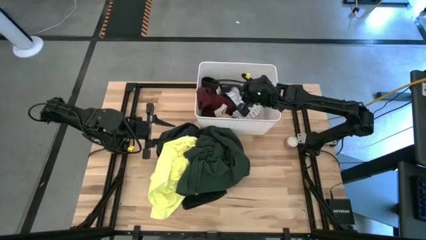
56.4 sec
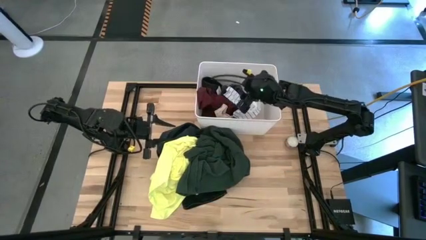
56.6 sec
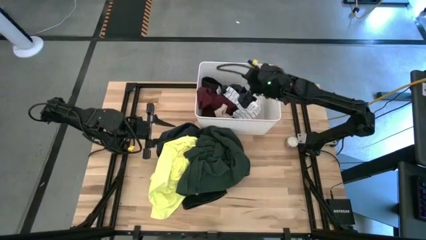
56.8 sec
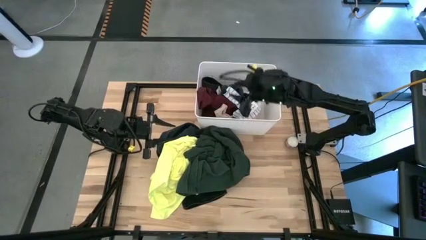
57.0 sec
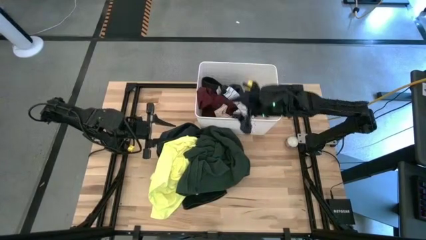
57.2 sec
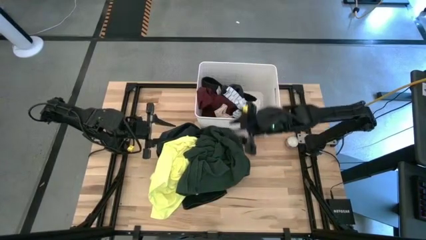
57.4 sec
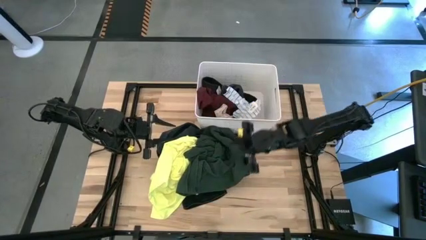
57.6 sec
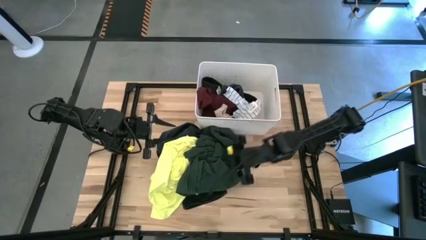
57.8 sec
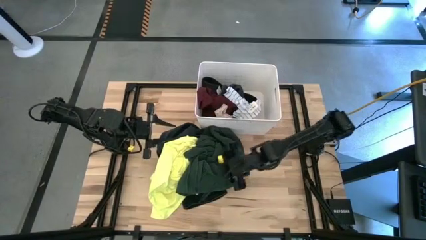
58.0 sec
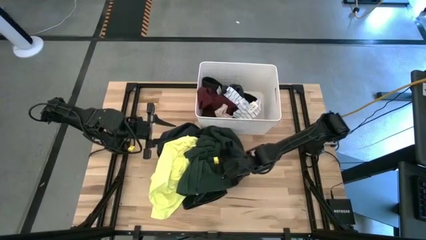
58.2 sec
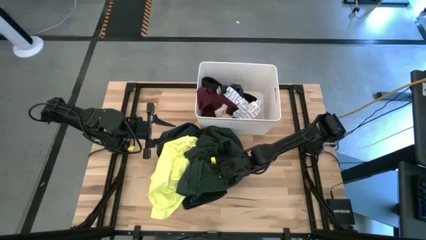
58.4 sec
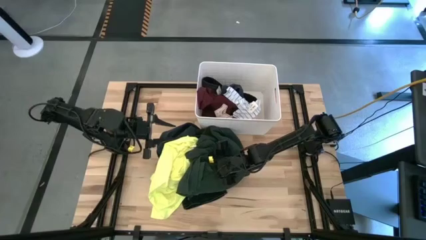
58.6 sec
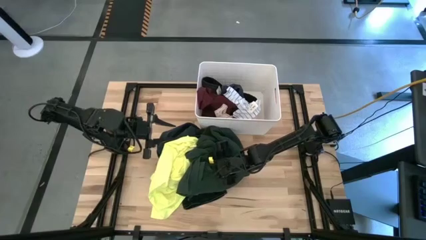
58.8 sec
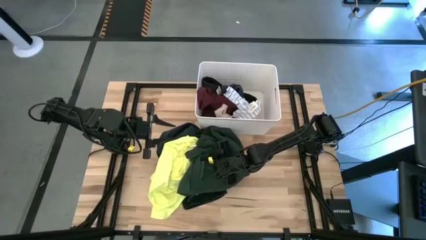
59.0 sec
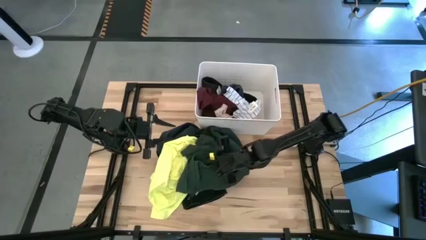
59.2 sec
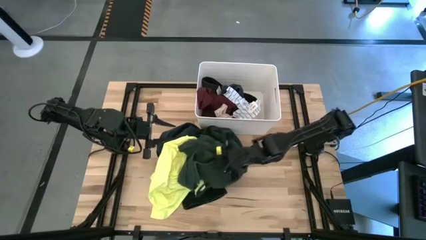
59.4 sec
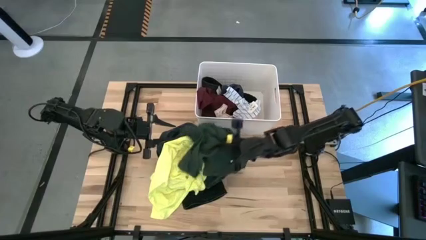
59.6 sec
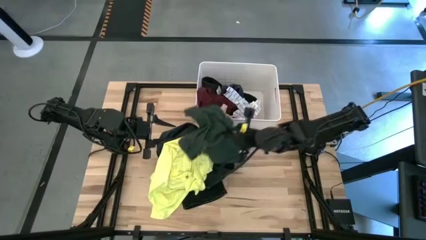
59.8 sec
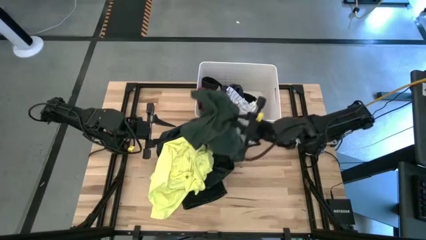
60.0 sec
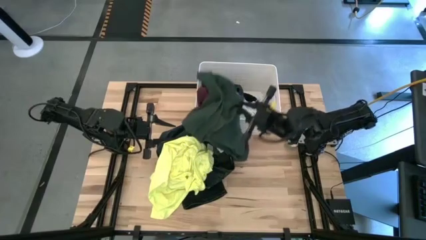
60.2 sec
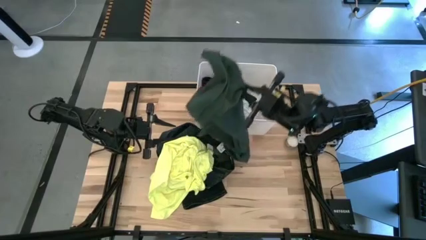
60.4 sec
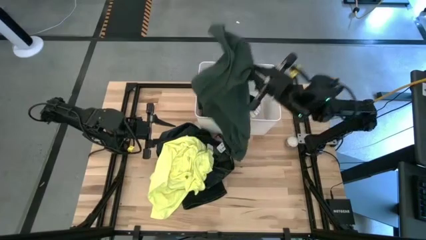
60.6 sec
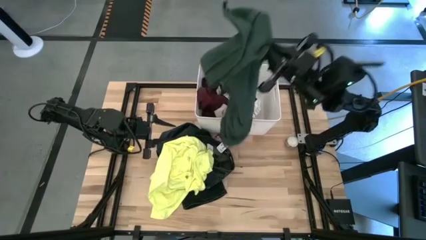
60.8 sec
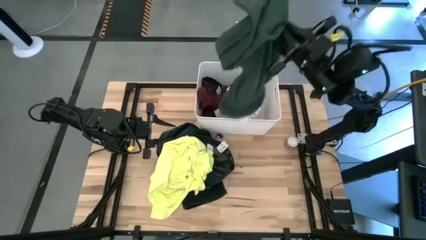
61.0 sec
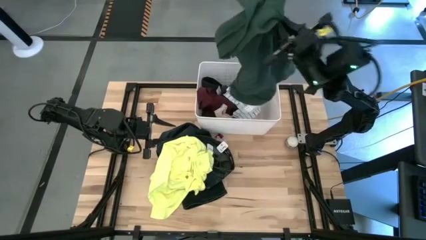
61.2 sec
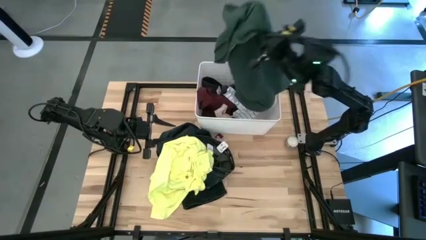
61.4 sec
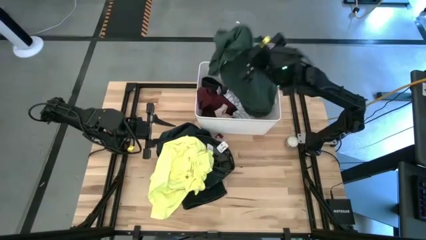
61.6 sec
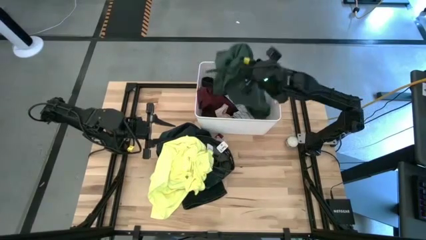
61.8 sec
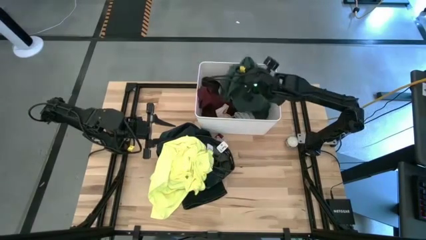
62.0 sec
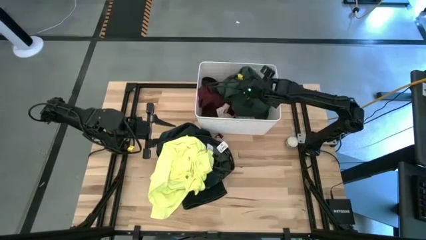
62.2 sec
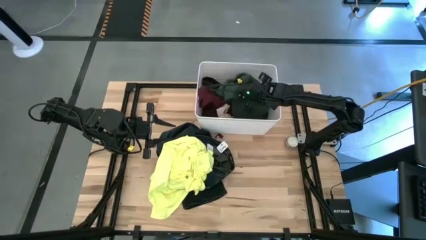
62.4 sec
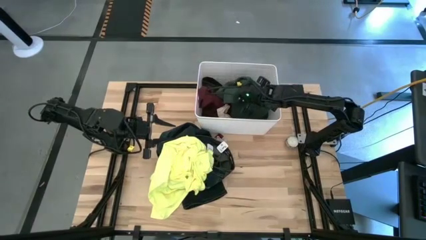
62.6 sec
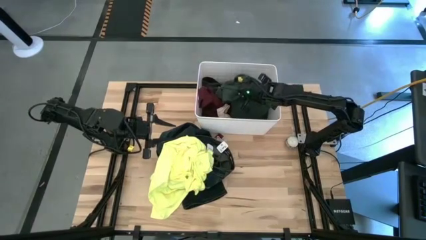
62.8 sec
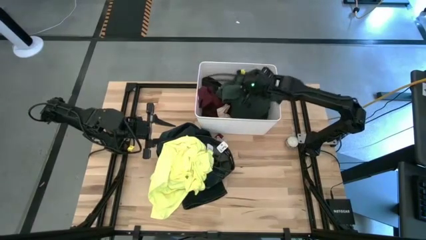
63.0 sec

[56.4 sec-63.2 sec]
Task: Sort clothes
Put the green shirt into the white laundry organizer

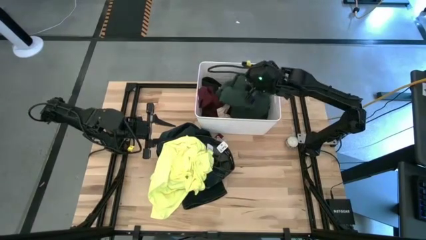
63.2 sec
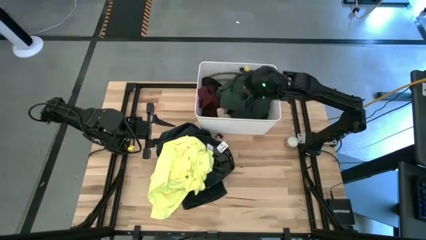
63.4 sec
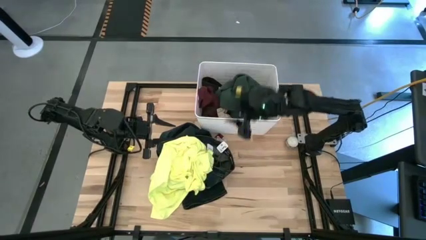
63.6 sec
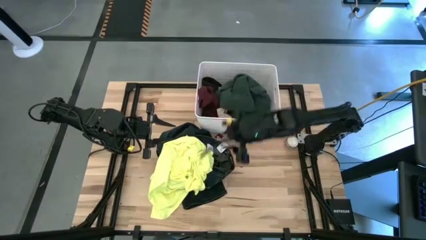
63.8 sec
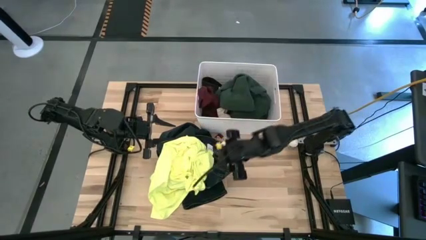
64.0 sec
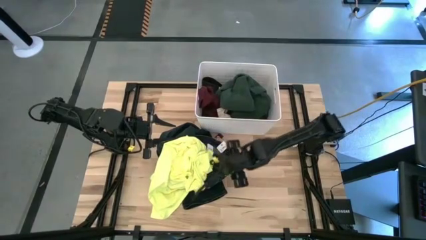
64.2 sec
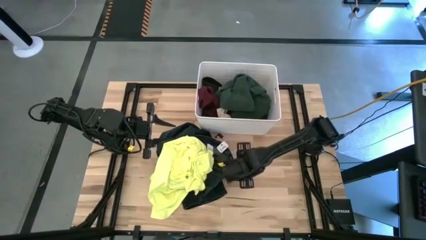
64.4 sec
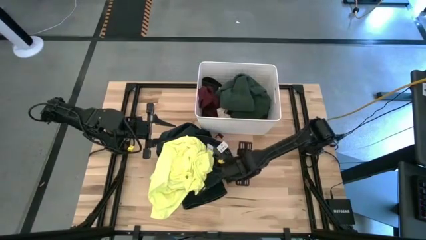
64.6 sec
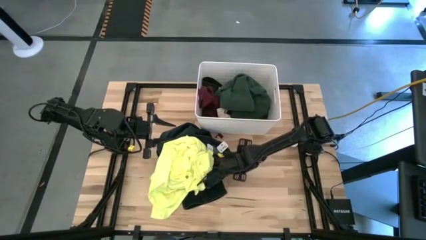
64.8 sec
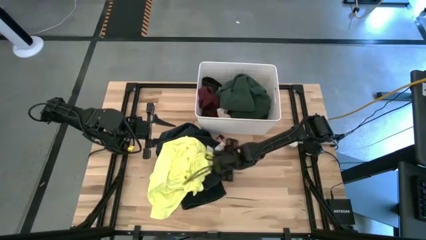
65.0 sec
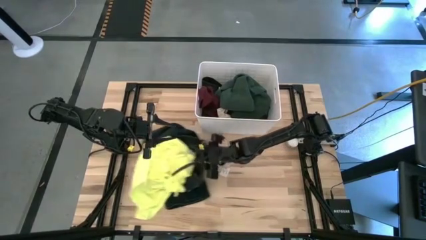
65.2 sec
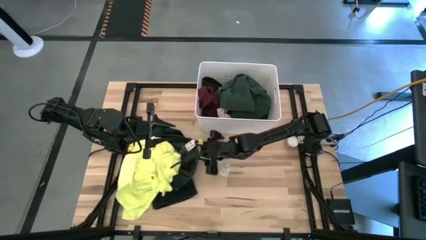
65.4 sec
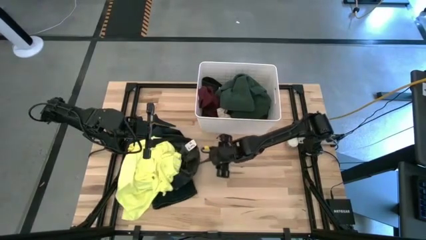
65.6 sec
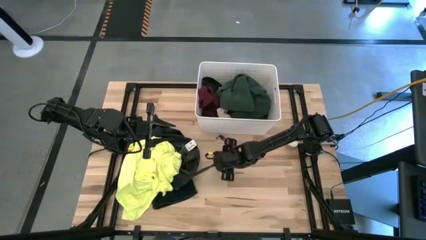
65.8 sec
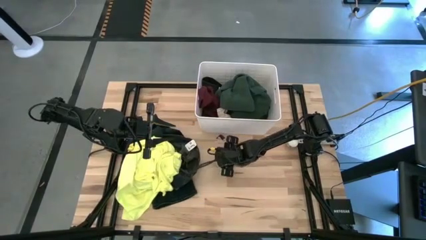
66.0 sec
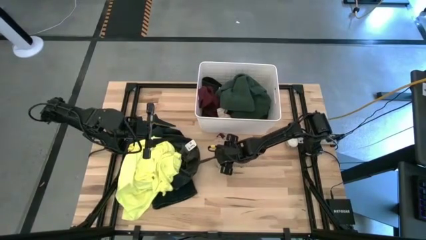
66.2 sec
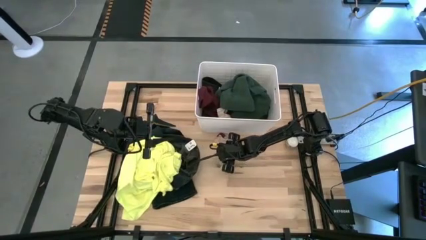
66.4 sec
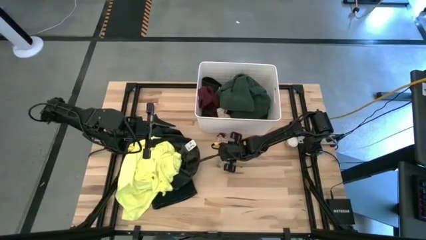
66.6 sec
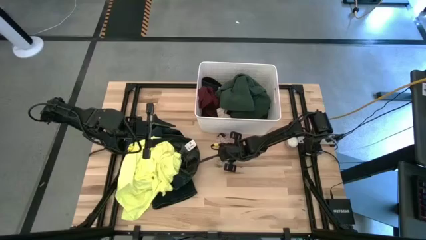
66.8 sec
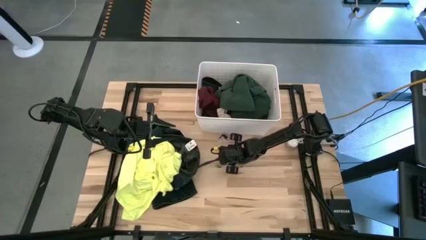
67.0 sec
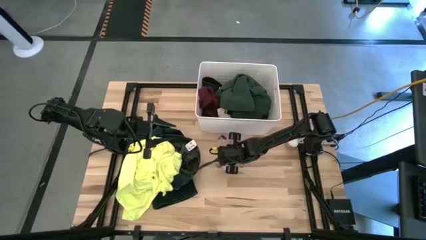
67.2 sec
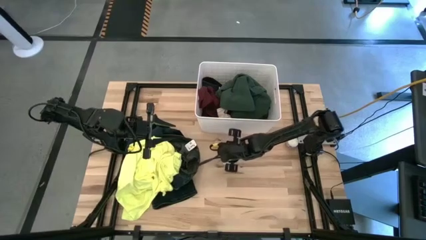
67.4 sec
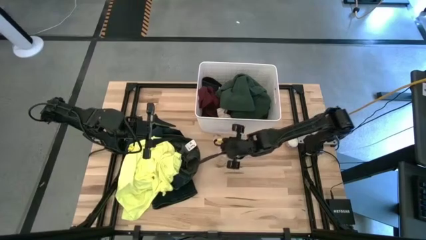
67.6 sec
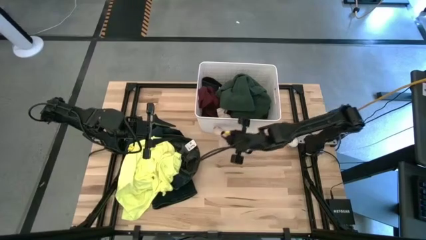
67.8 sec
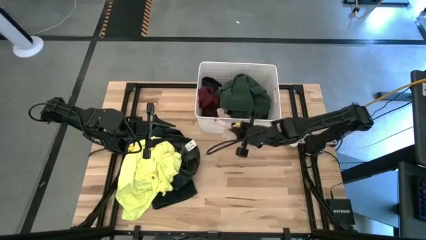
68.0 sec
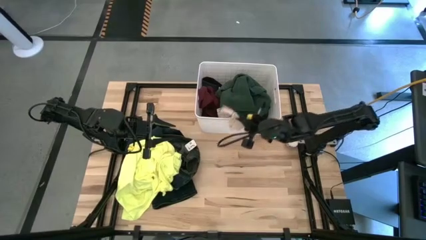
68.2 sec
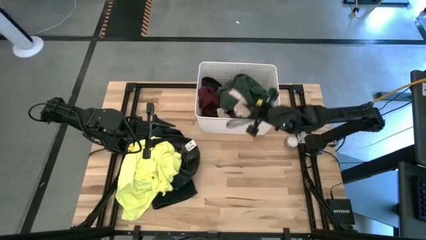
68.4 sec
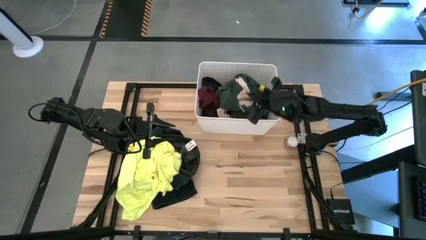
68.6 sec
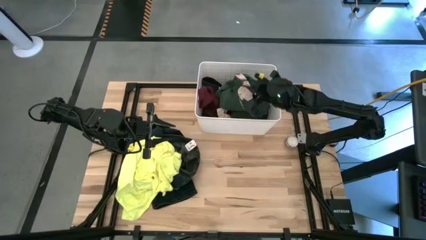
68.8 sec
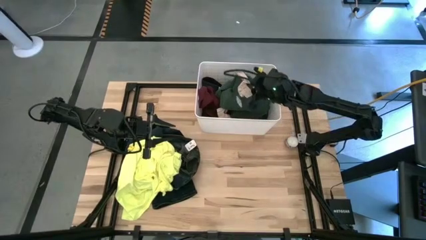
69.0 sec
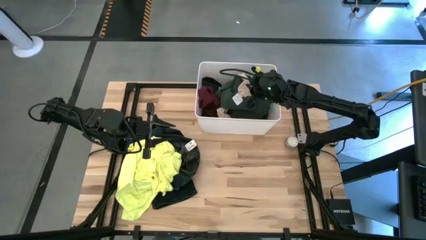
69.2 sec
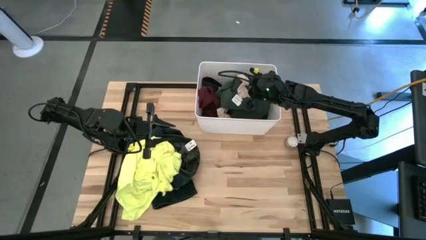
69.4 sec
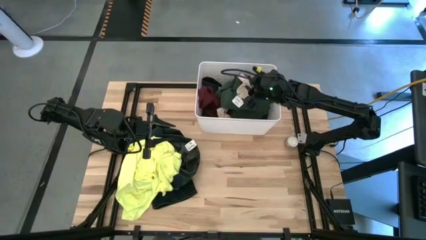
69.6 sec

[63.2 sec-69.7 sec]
Put the white/pink sock into the white laundry organizer

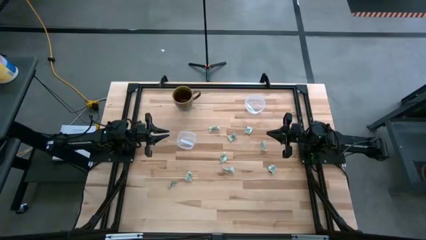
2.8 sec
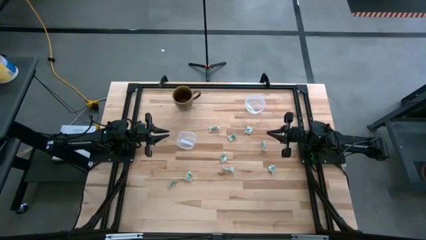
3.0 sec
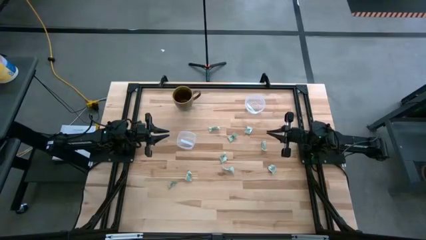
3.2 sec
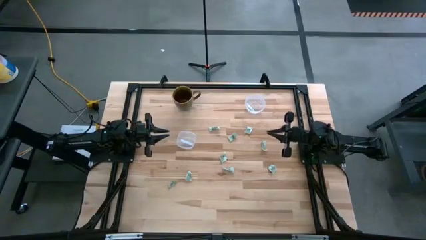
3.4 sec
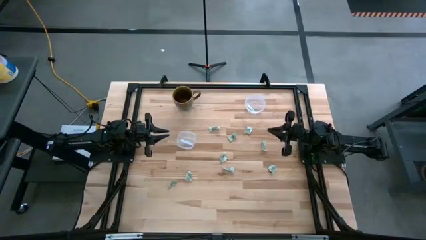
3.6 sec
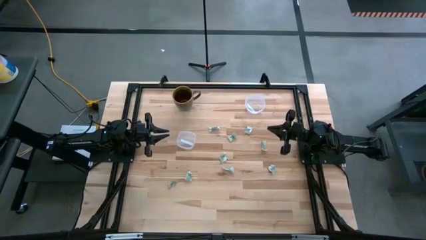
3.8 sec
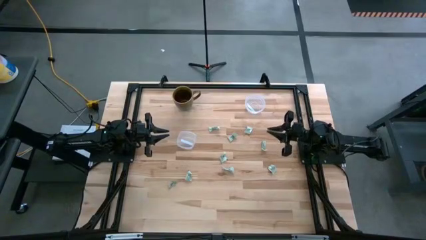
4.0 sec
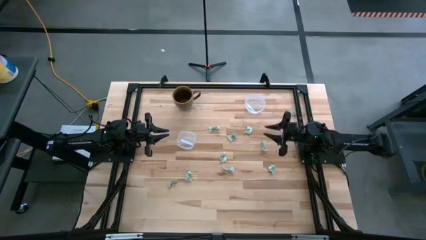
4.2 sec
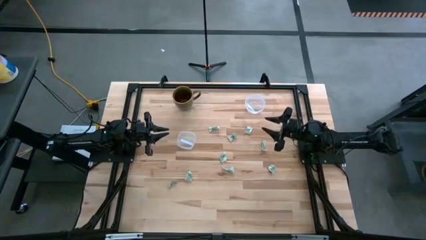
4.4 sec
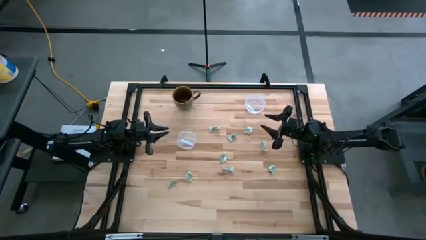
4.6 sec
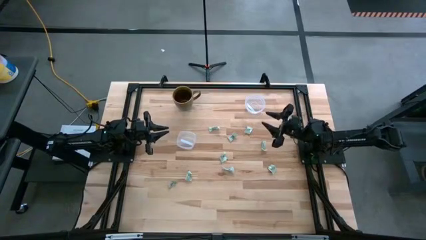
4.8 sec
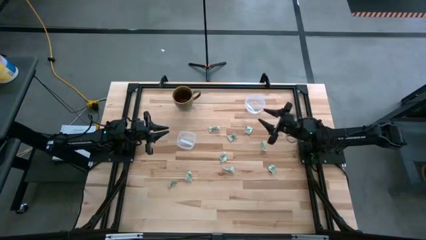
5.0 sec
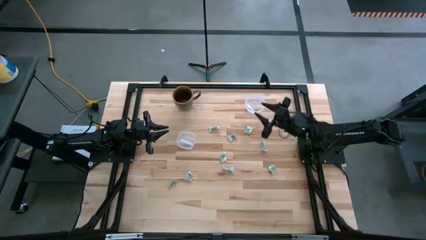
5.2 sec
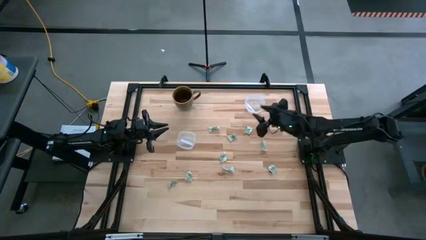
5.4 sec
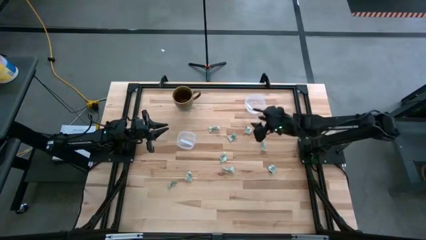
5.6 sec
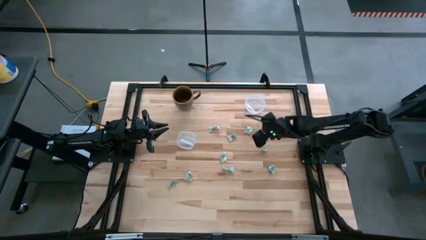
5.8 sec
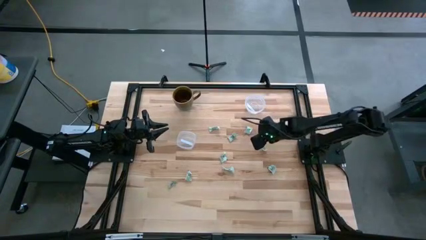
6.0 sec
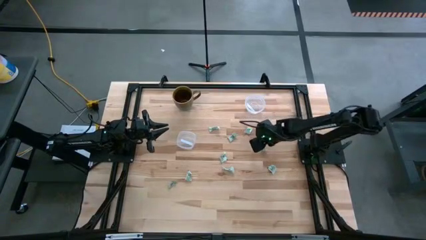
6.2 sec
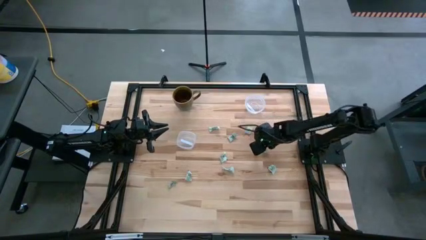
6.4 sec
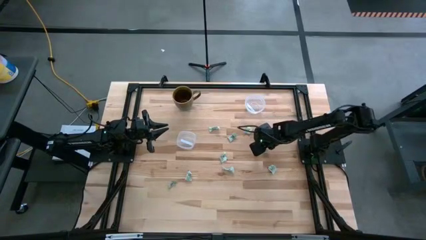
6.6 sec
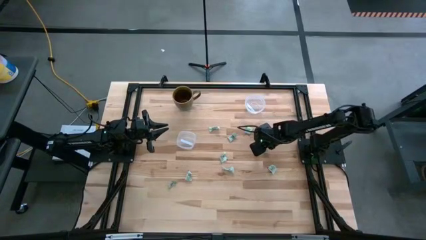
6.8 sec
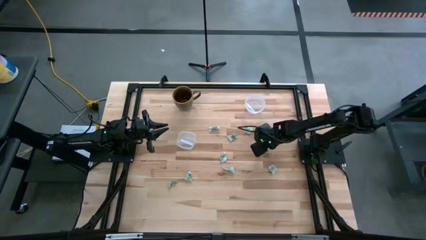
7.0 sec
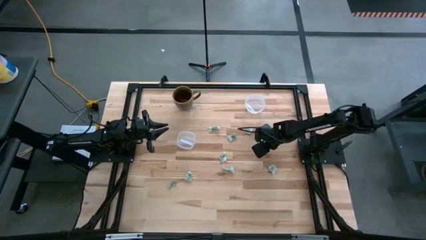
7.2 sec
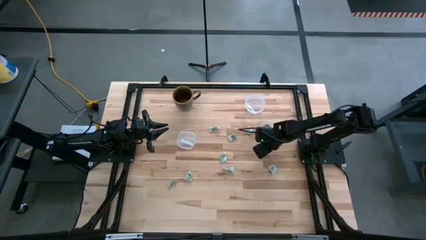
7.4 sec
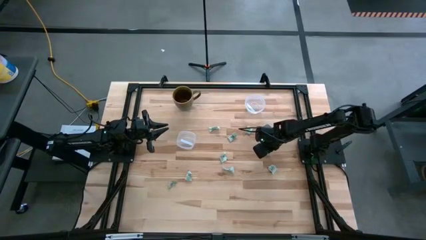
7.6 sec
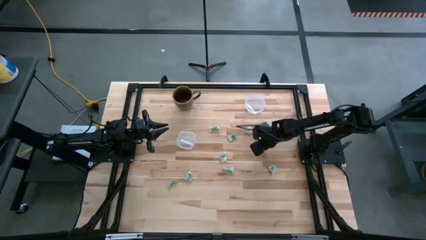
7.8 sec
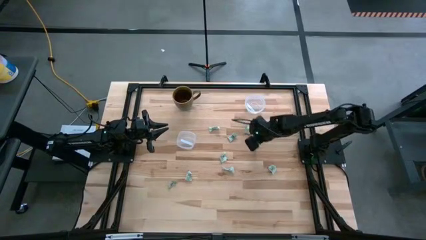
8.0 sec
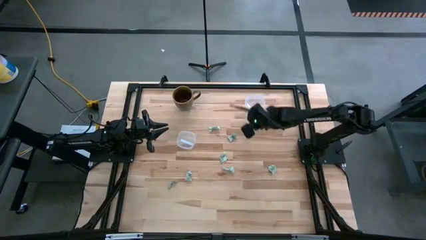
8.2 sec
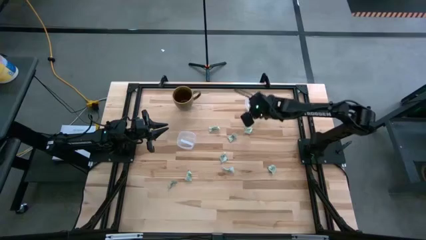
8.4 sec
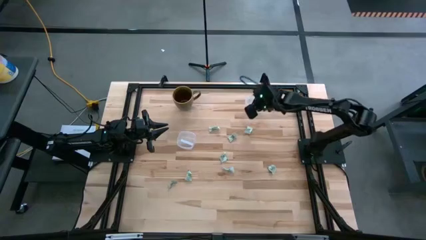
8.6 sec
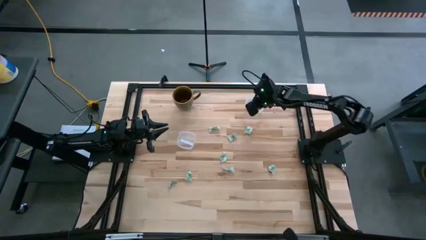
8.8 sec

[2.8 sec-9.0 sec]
Task: Pick and place Stevia / Truvia into bins
Put the stevia packet into the top container
